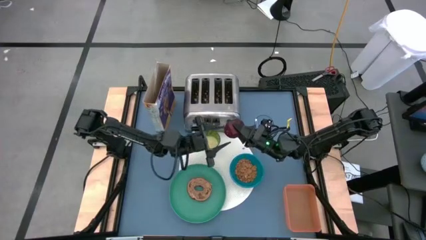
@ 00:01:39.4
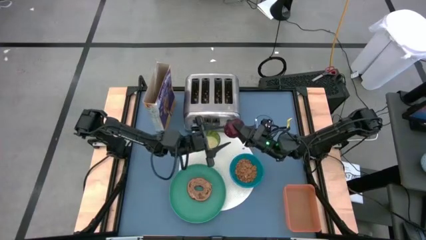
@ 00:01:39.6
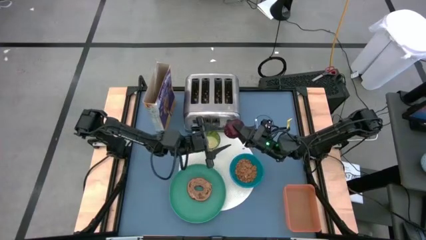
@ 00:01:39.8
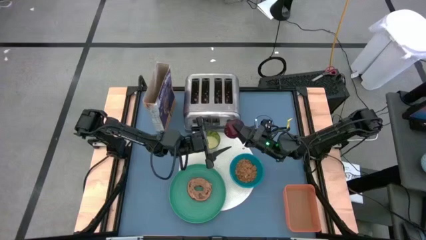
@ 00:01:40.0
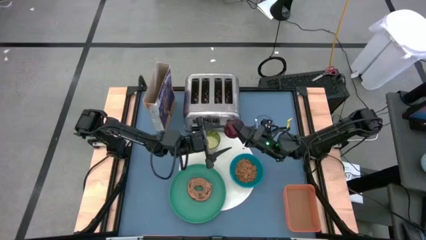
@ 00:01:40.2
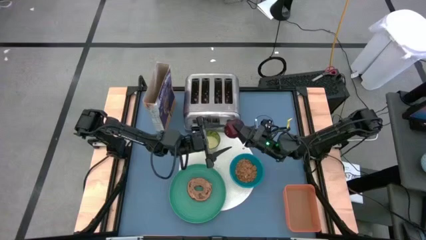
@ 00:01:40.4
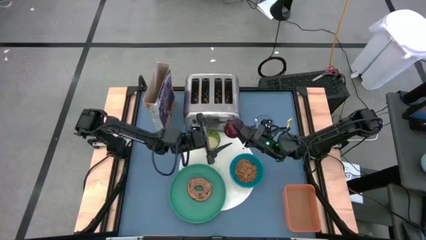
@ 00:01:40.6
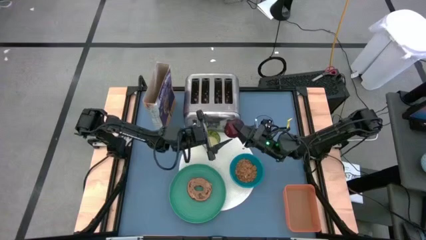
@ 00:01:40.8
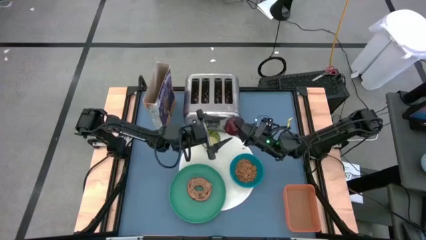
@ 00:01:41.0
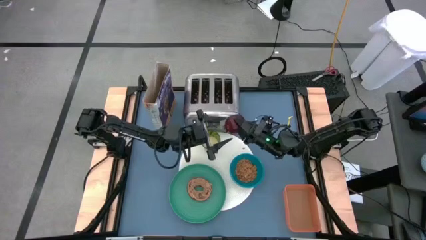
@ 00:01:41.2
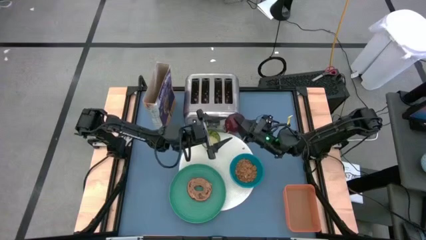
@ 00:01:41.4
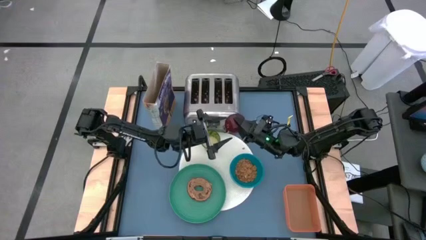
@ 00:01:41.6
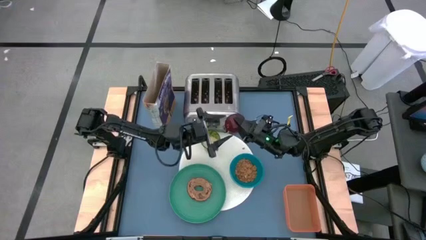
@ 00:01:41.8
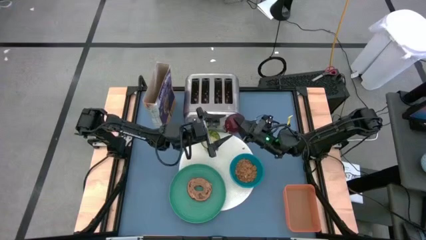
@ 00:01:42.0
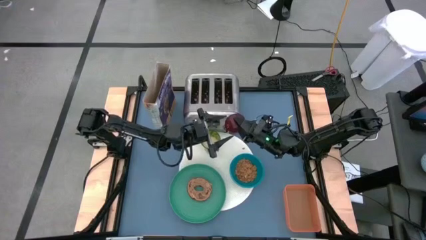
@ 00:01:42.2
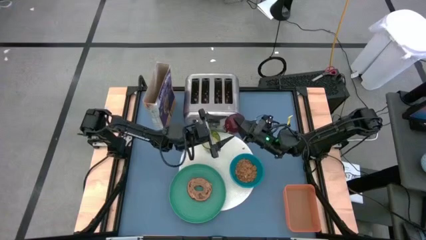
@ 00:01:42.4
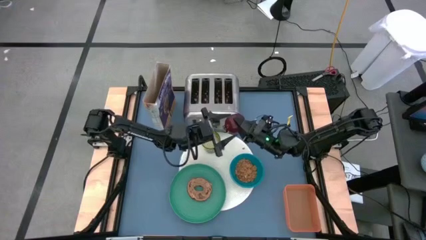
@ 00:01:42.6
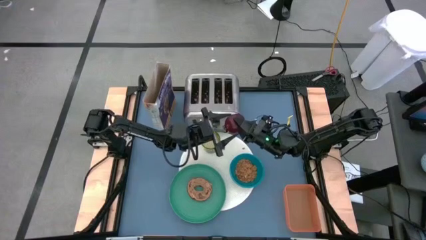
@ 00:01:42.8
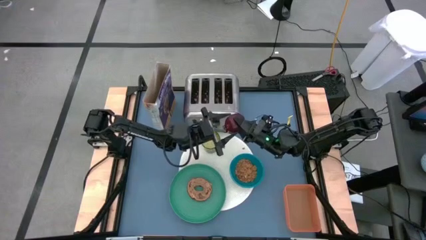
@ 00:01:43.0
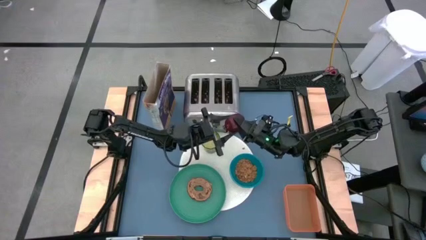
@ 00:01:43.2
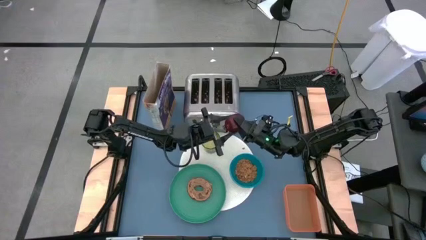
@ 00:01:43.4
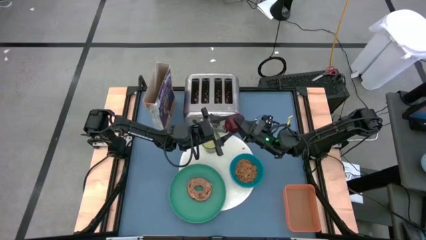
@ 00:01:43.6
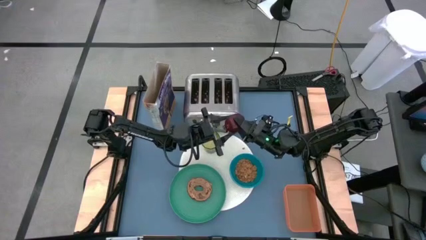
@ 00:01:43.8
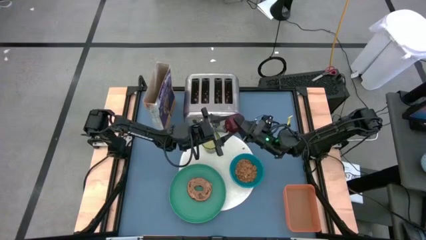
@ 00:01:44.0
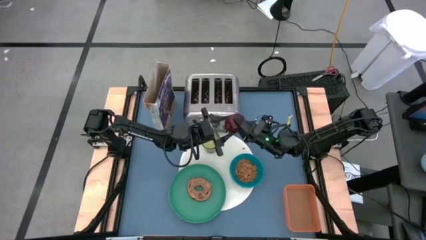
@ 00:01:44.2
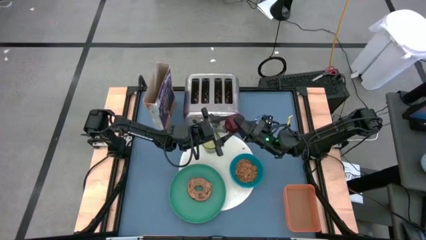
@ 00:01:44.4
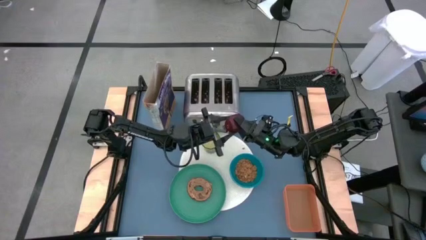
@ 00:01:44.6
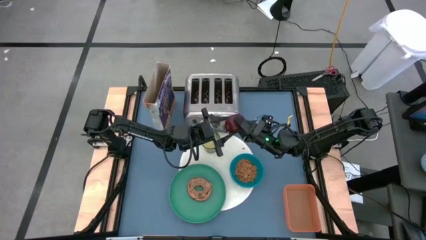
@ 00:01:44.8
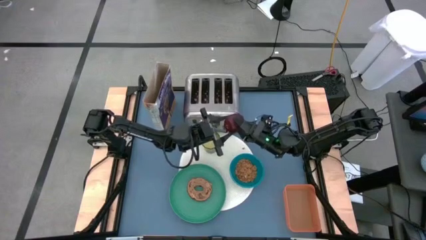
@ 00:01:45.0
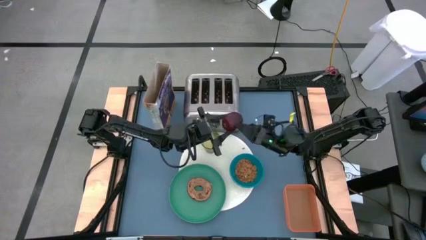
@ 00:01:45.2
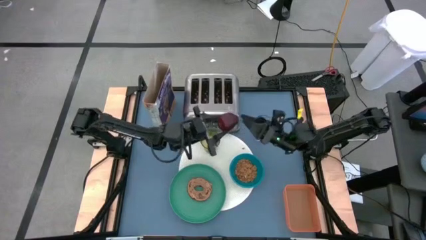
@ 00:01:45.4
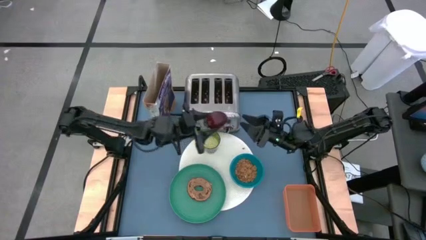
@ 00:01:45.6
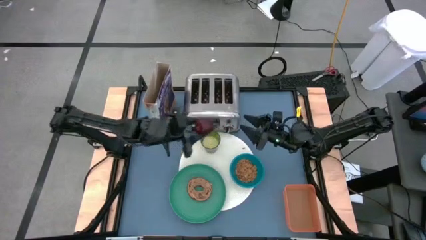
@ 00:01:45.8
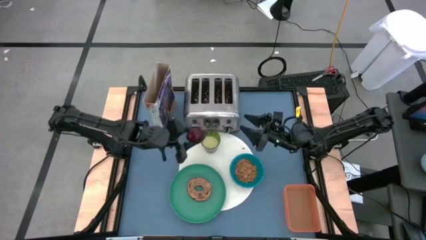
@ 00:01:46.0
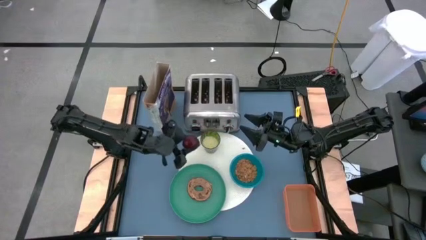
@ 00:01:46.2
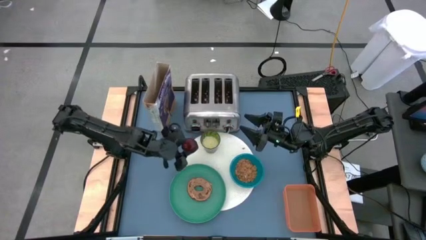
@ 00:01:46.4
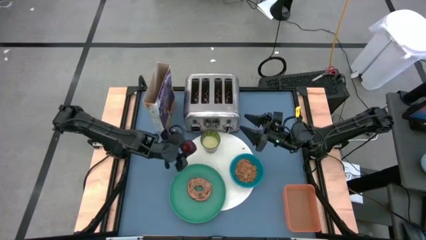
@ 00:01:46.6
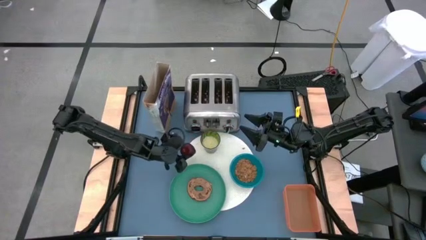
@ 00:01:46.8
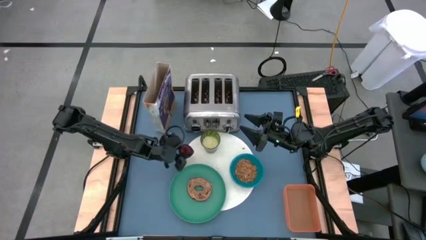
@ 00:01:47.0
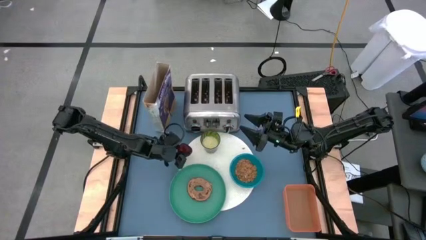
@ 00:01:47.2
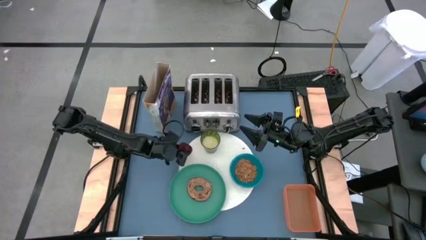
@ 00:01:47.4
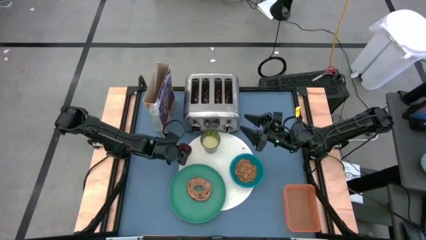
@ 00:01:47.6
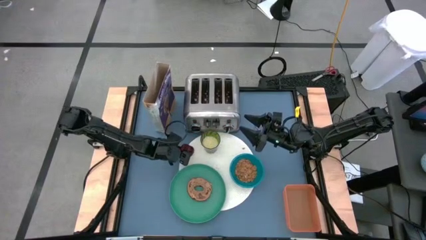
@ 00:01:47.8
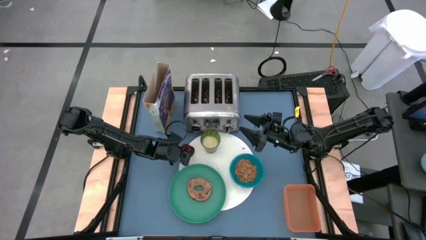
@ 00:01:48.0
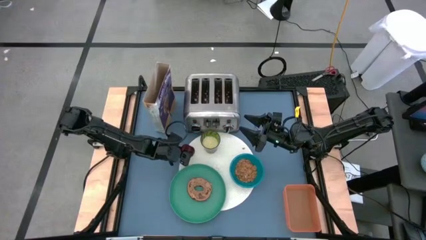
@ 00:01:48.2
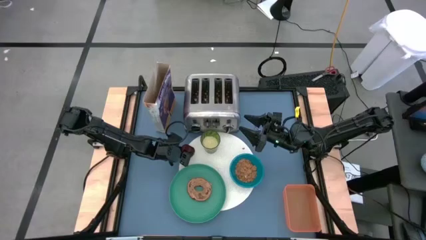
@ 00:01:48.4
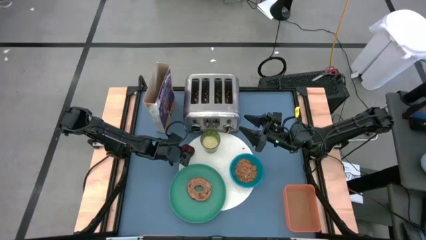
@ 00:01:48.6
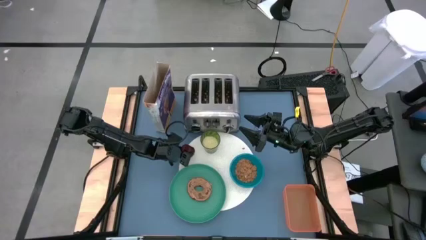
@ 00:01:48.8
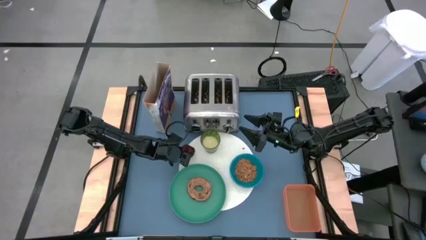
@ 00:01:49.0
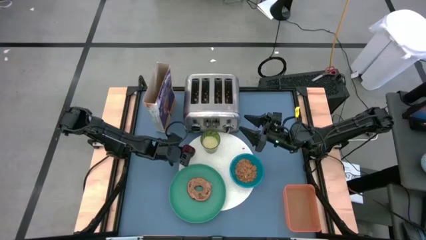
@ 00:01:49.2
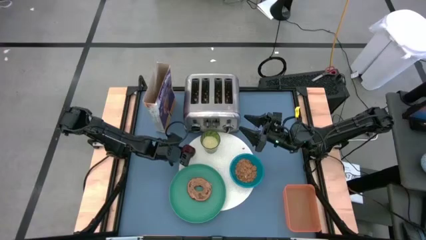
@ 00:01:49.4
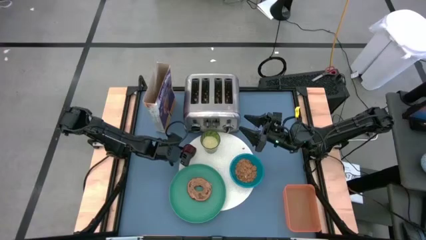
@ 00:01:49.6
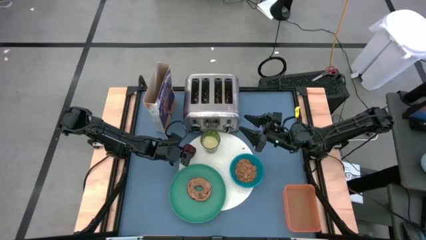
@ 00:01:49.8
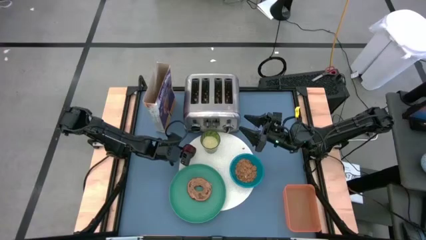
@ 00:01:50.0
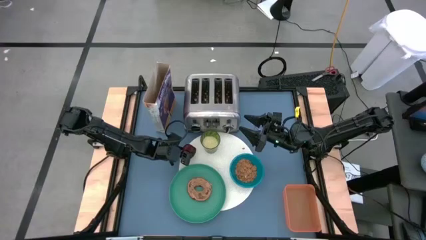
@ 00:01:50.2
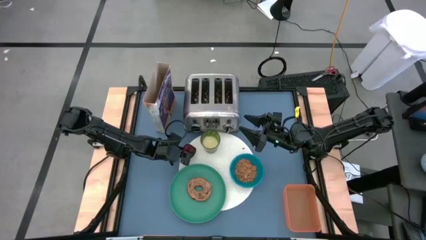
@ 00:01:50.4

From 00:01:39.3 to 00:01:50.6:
Task: Arrange a breakfast setting
Put the red apple to the top left of the placemat

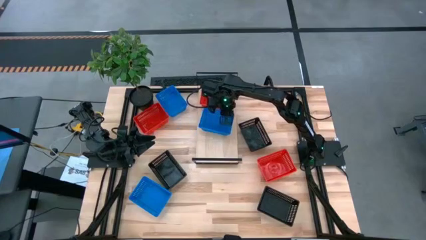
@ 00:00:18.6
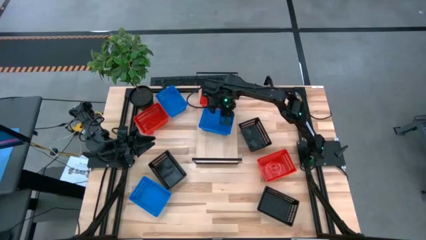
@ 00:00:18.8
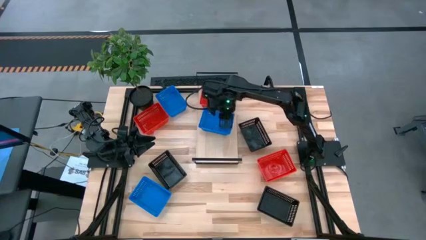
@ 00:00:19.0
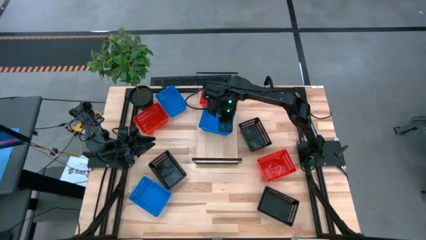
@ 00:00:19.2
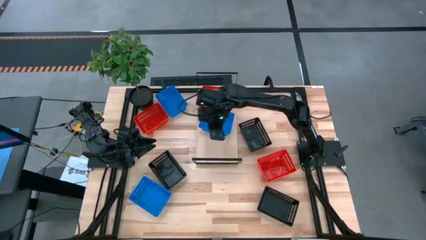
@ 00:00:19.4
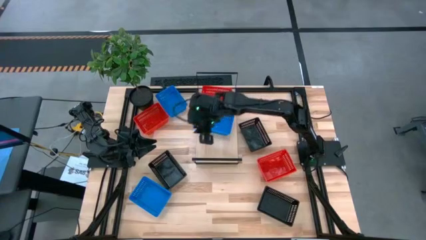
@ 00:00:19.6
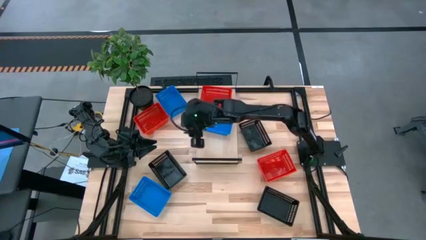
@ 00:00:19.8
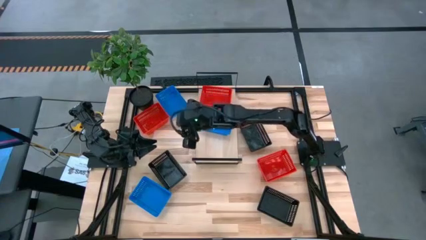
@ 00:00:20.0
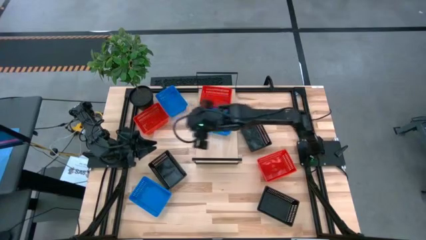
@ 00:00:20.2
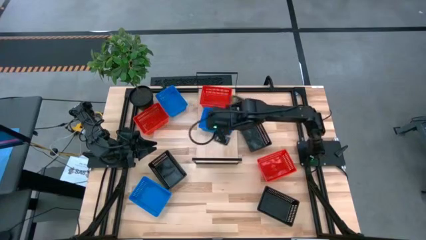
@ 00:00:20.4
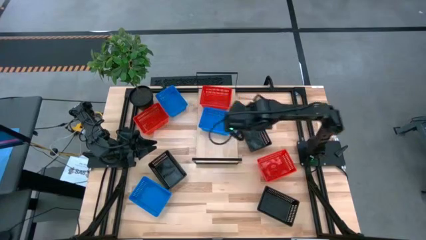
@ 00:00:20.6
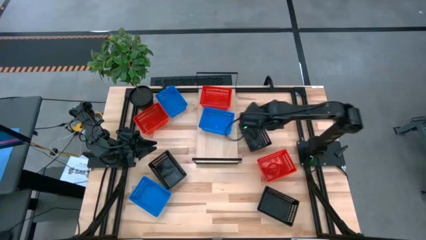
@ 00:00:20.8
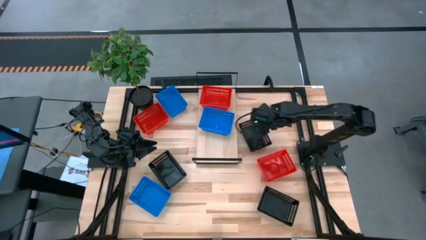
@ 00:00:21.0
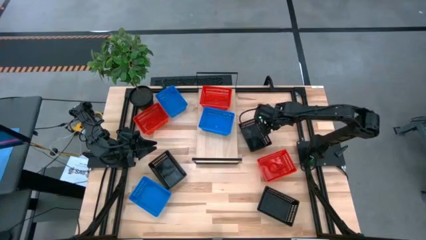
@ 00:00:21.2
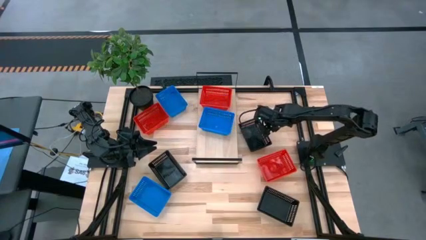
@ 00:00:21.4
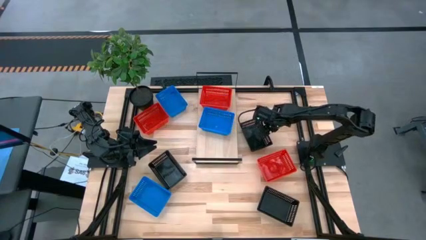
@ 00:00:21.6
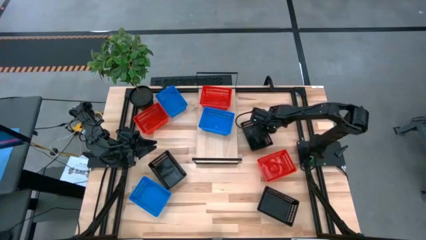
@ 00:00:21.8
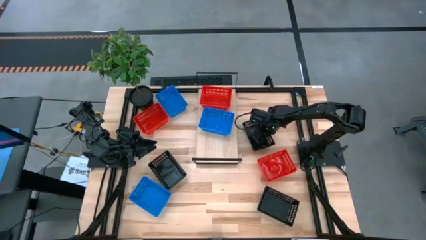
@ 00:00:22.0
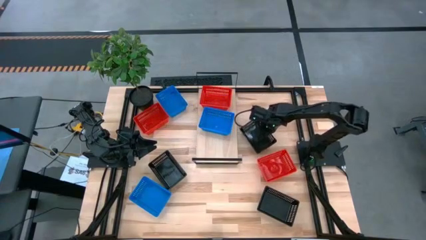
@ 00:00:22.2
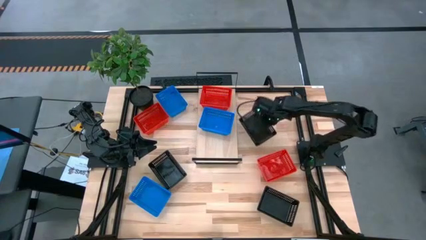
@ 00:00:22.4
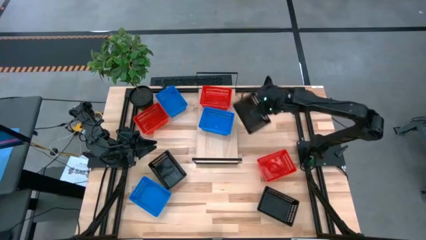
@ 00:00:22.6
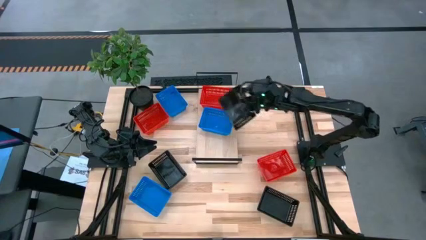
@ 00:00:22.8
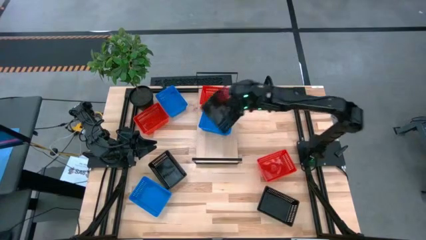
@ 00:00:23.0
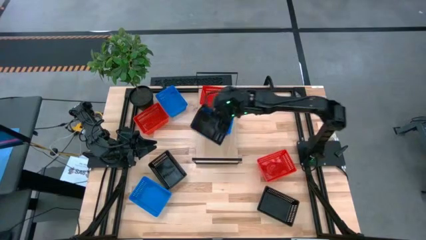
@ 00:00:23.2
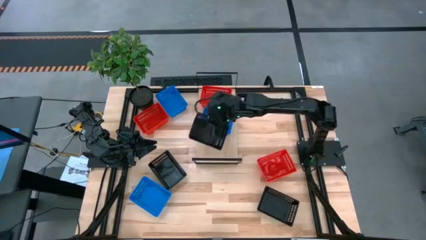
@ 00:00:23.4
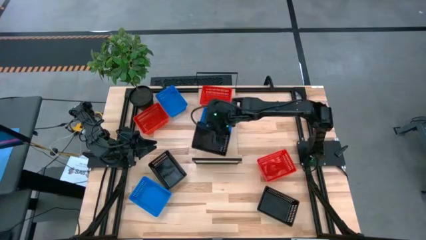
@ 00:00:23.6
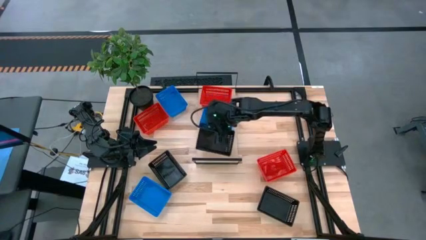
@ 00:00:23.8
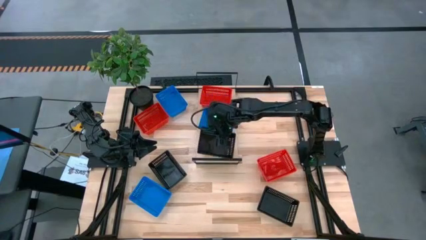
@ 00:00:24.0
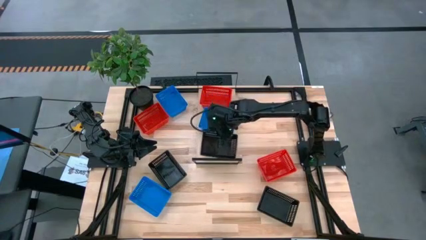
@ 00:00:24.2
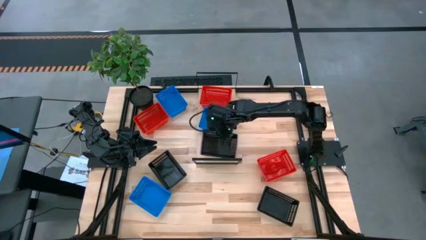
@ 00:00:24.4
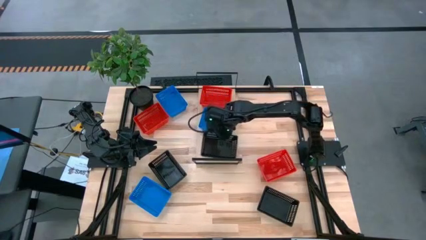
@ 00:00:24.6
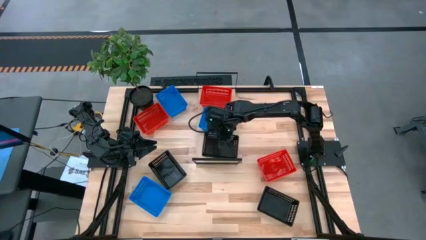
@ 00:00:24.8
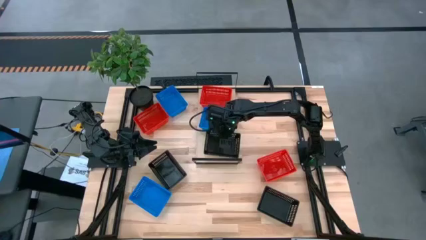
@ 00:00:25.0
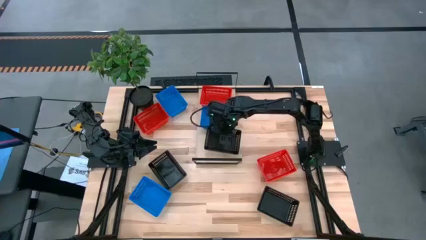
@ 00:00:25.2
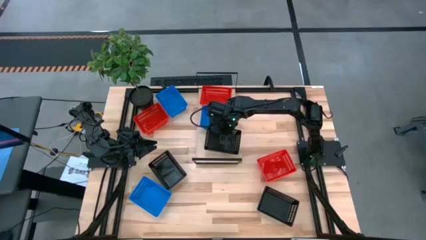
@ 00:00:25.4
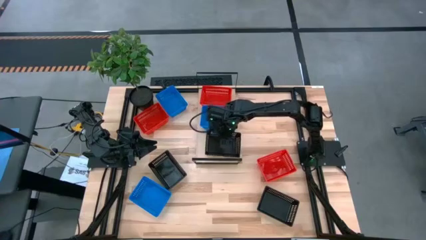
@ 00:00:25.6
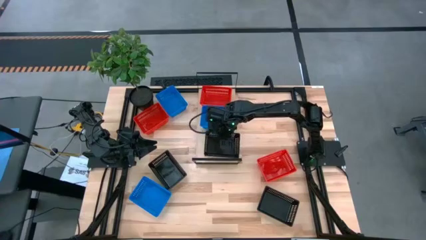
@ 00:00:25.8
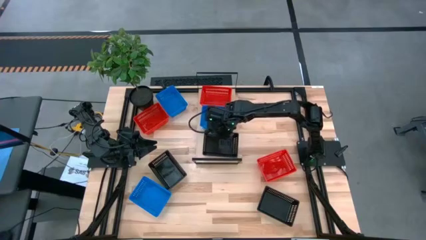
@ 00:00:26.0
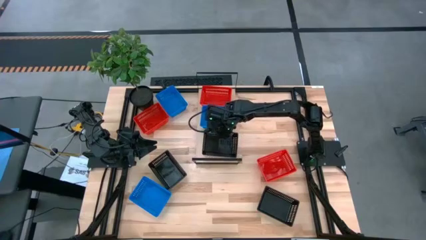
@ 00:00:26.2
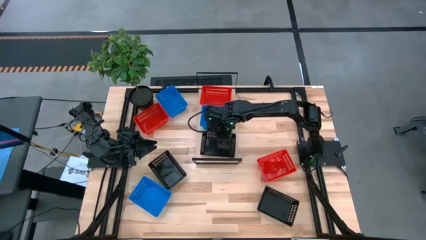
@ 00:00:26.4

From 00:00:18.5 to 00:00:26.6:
Task: Stack baskets on shelf by color
Put the top black bin on the shelf
